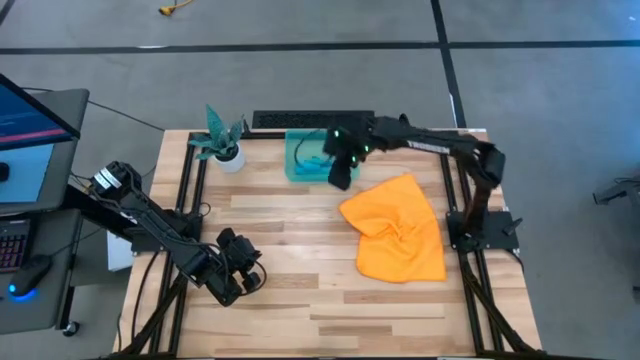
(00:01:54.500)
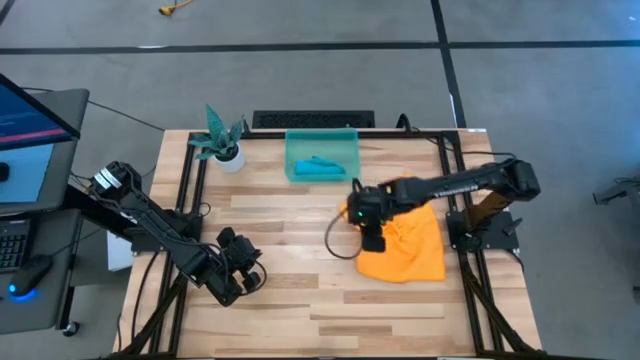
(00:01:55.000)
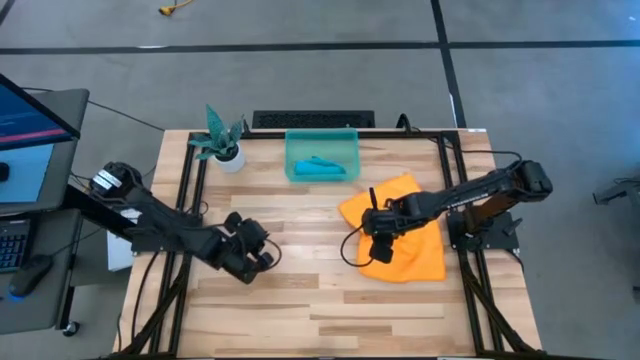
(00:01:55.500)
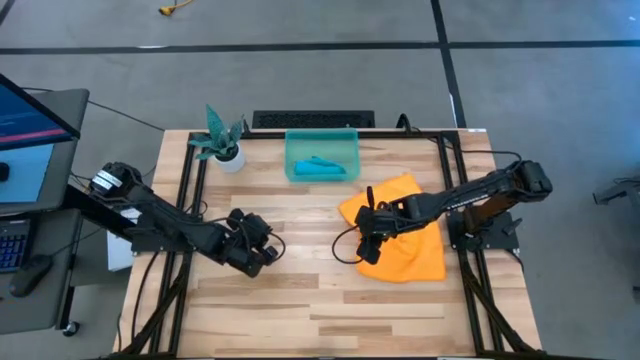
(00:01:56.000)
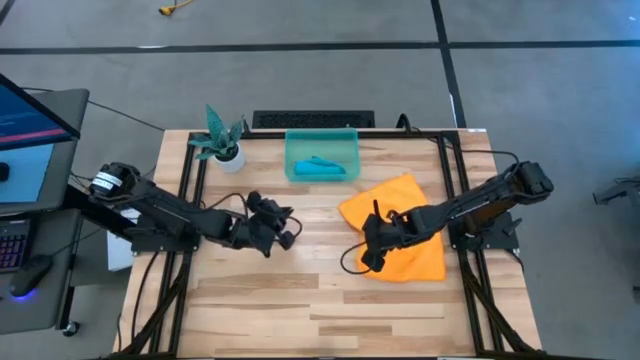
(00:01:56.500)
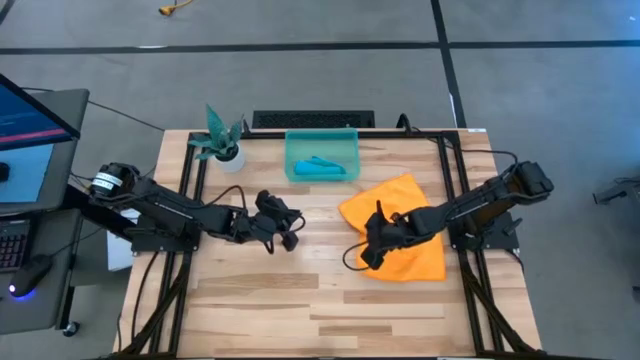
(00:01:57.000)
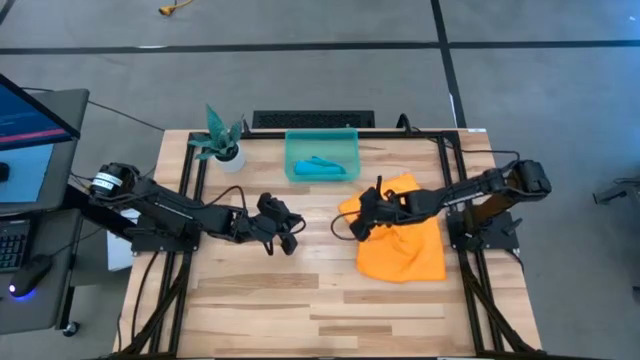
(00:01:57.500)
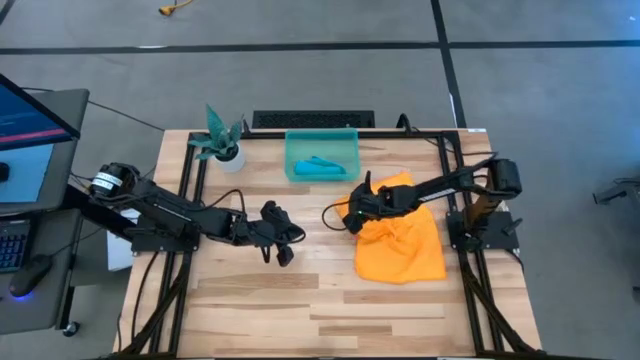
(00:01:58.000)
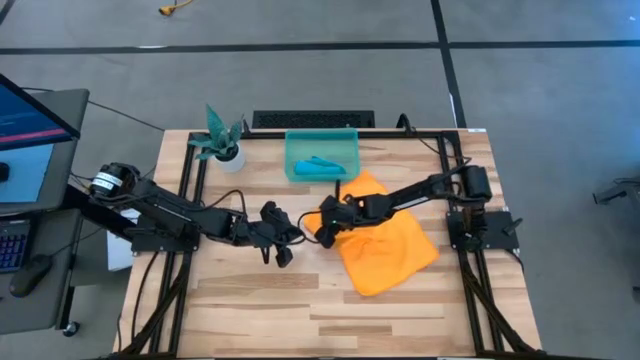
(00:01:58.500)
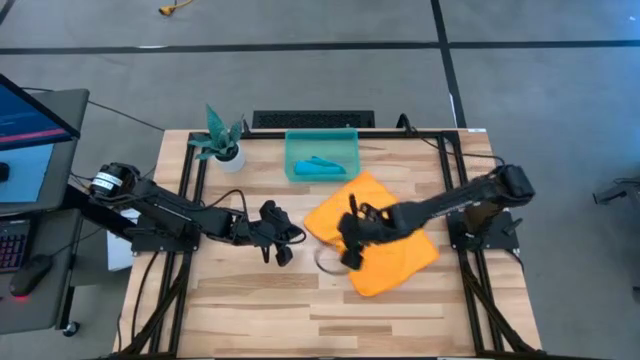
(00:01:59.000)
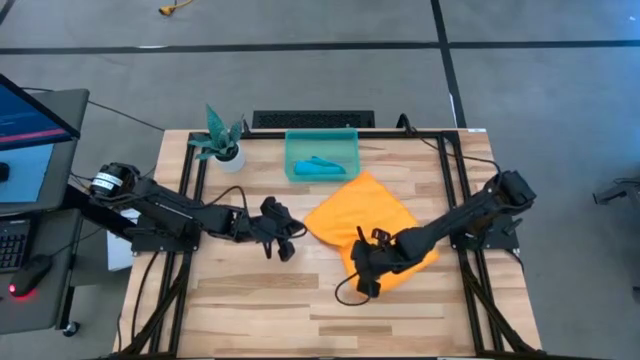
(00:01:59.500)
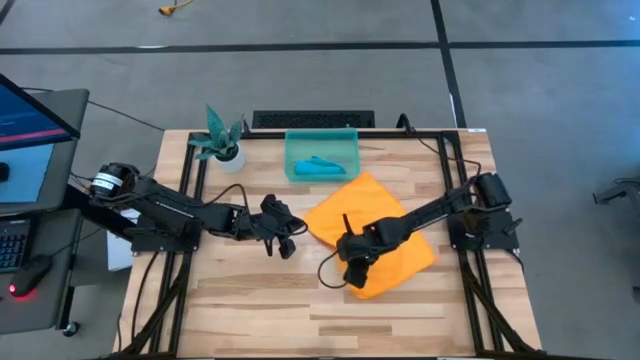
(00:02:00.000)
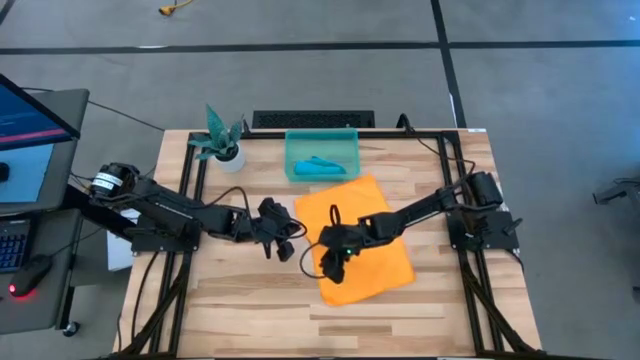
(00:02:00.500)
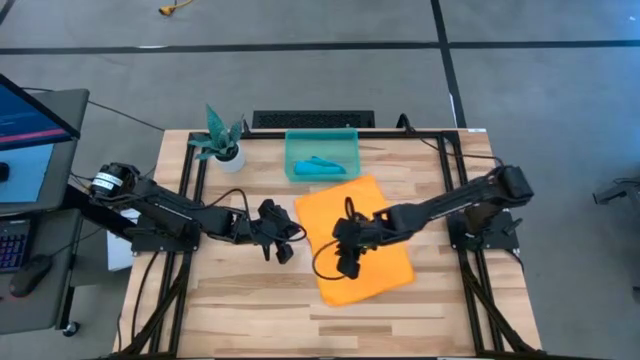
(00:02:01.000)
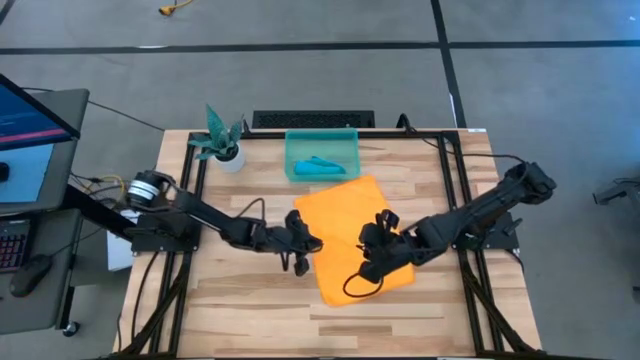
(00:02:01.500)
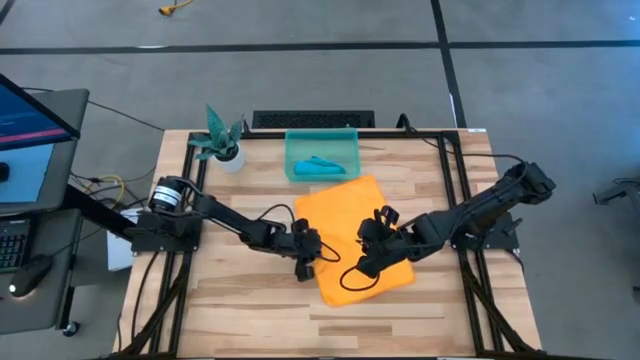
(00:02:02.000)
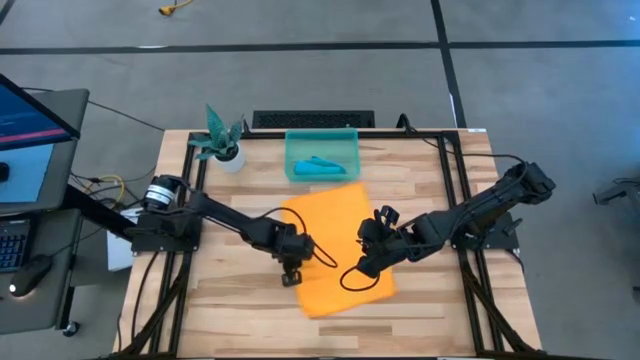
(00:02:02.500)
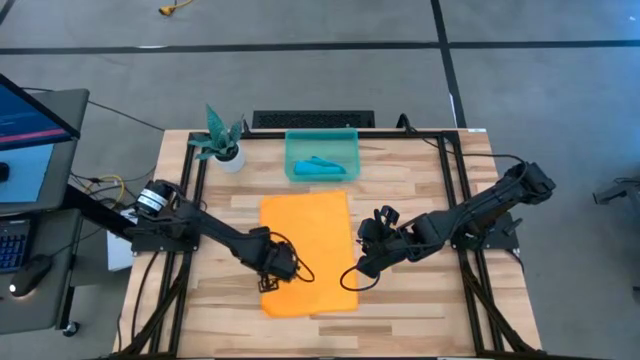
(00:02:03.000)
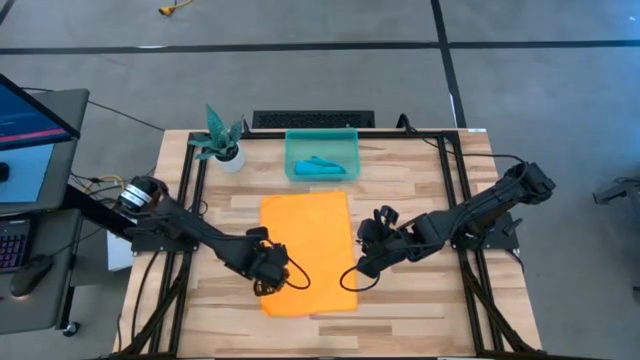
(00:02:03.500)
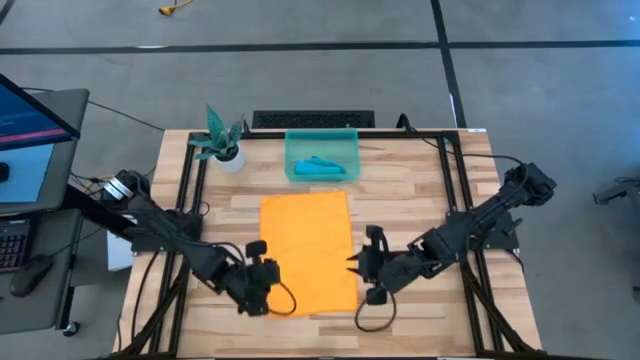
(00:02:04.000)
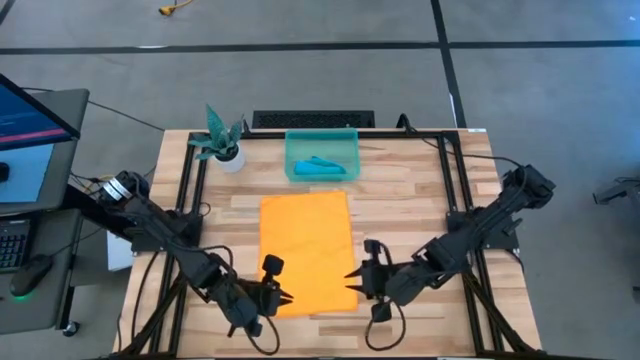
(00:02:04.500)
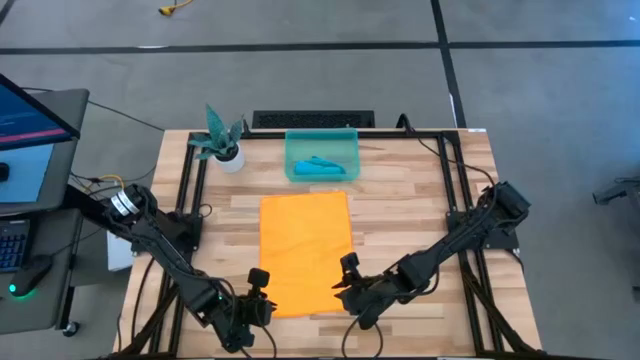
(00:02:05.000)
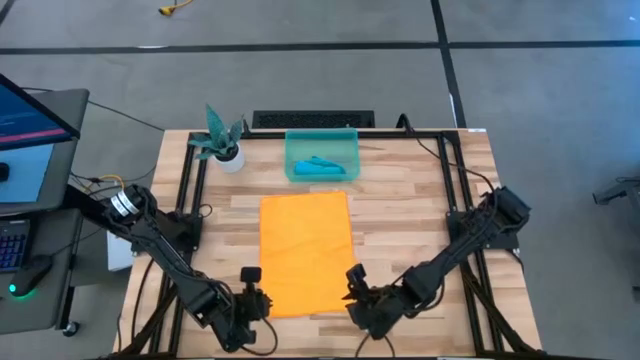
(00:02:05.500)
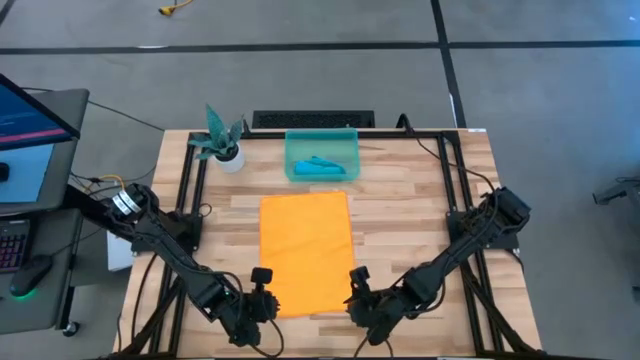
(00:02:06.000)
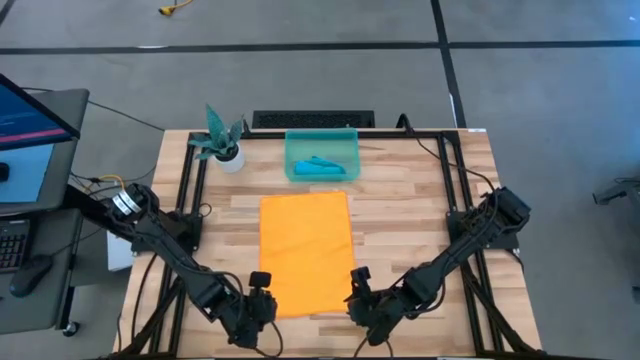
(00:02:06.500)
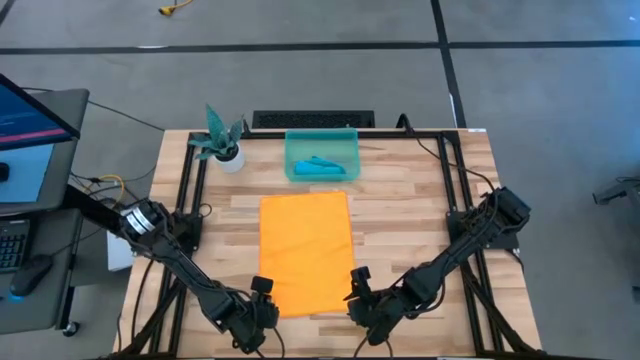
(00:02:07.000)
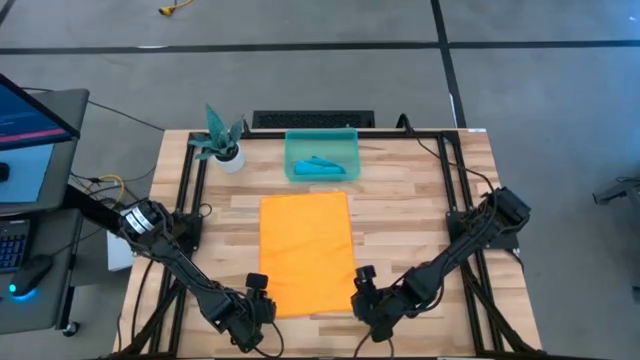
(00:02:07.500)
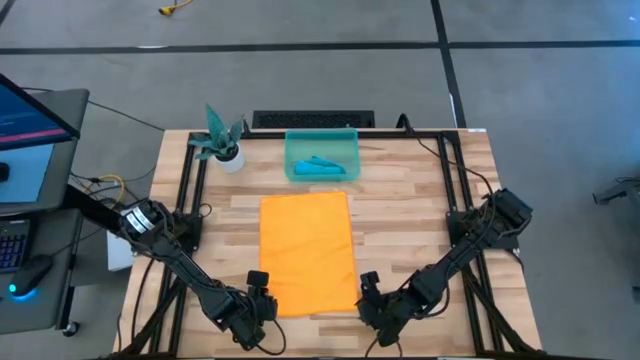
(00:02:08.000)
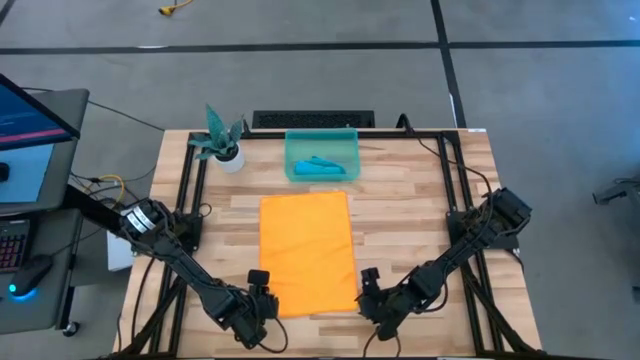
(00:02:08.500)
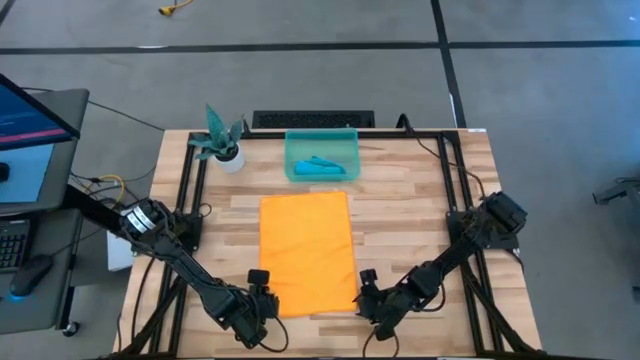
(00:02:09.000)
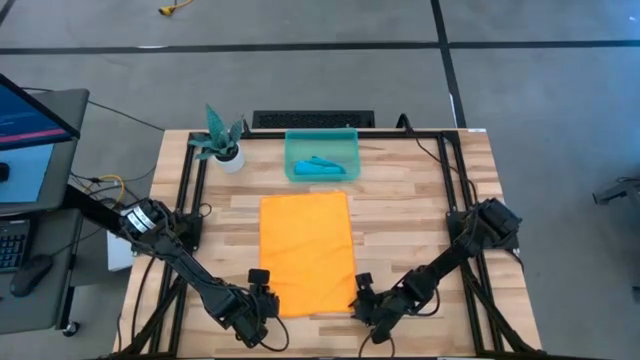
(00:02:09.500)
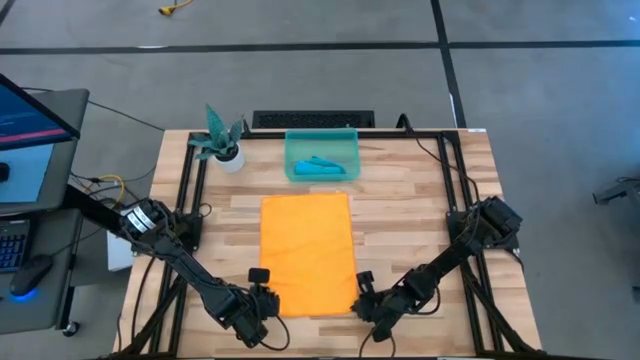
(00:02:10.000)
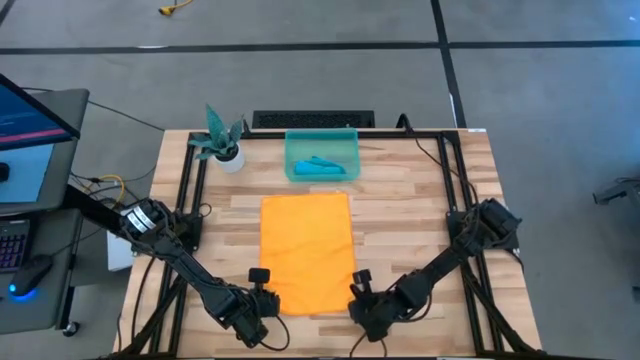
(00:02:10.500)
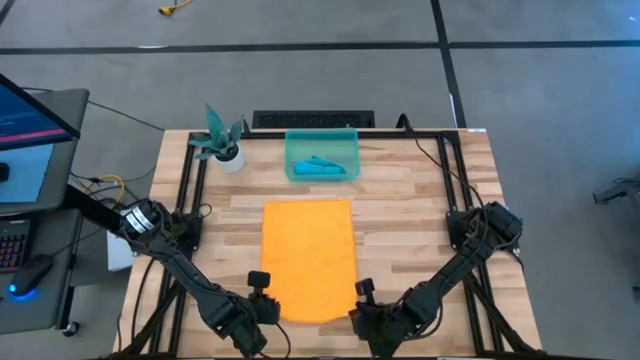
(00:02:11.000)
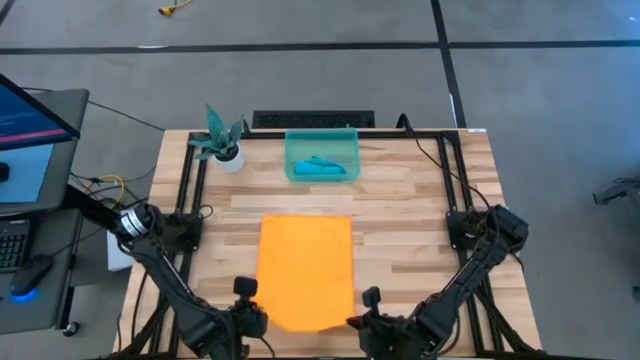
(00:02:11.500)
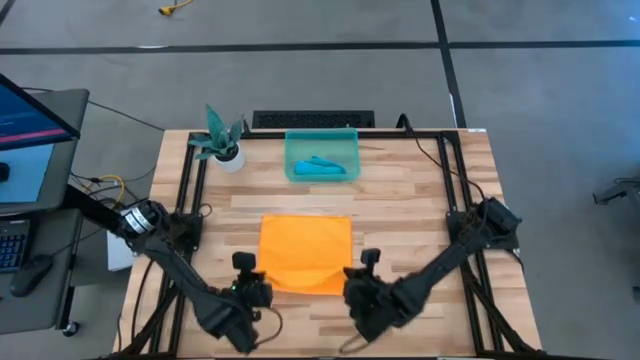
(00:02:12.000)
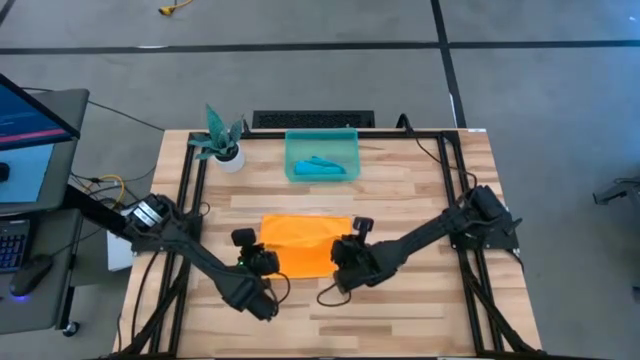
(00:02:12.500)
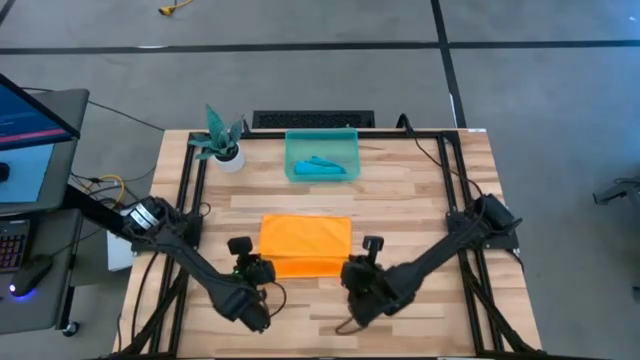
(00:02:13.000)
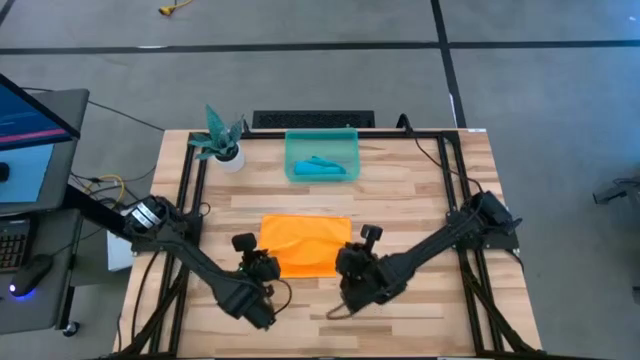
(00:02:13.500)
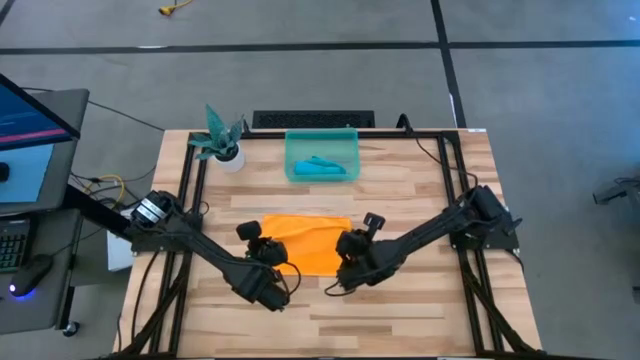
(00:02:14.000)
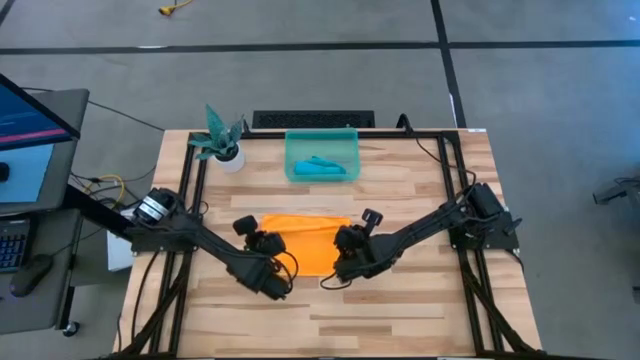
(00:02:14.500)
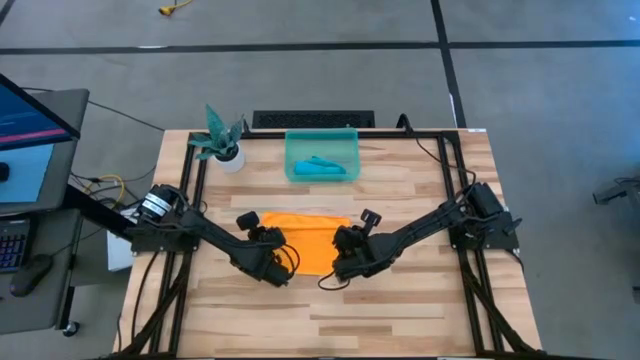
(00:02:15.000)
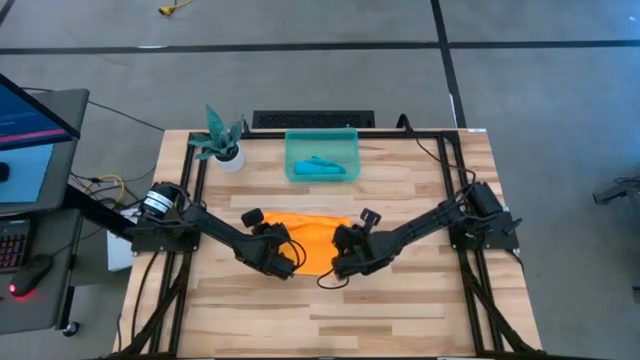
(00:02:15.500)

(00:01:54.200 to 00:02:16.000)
Task: Roll microfiber towels into tight, uniform cylinder then place into a basket
Roll the orange microfiber cloth
